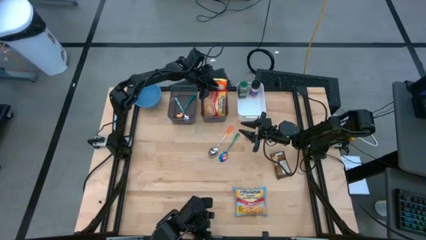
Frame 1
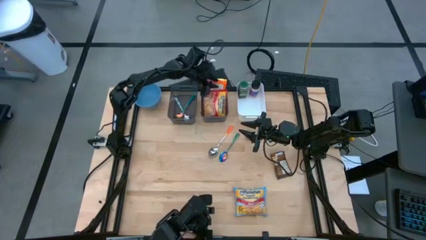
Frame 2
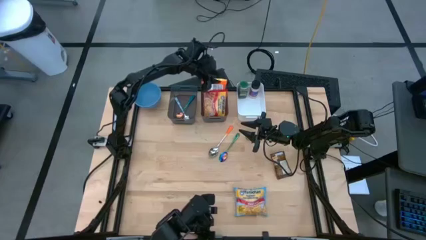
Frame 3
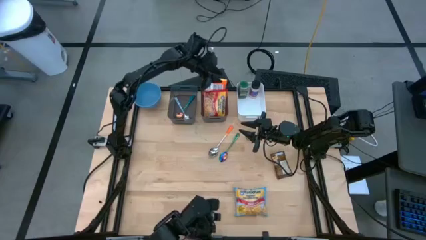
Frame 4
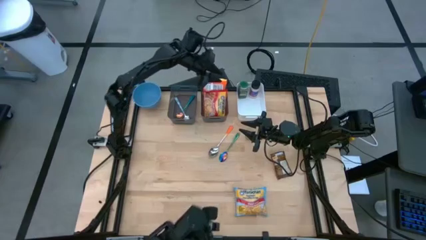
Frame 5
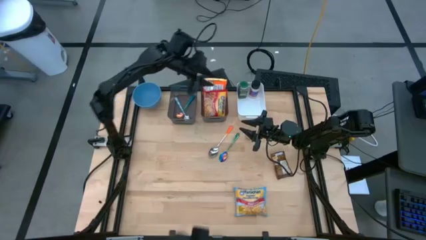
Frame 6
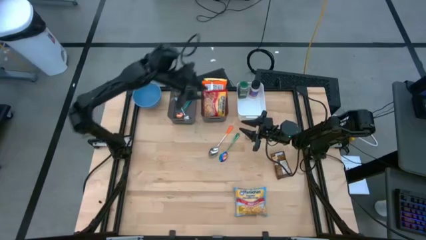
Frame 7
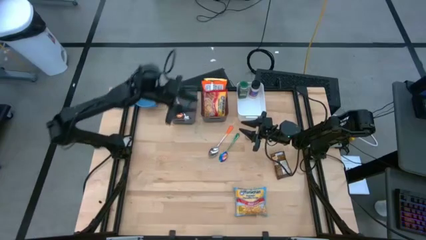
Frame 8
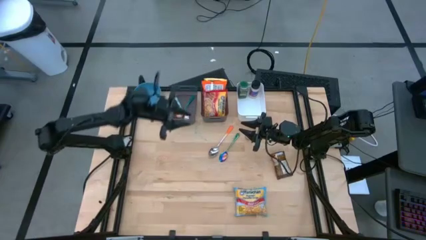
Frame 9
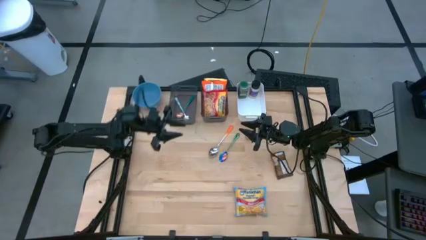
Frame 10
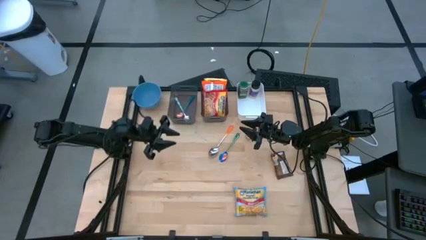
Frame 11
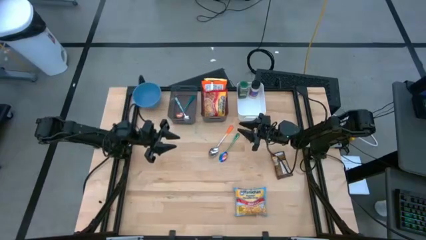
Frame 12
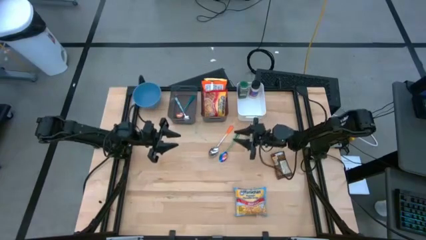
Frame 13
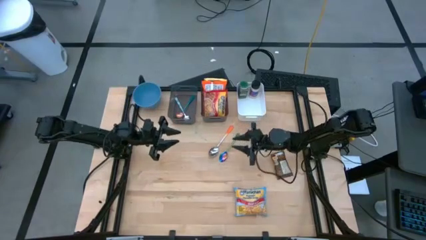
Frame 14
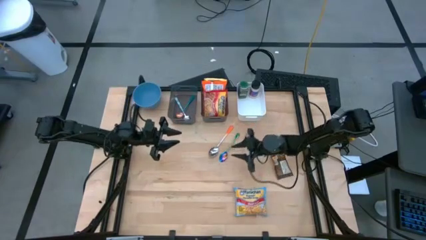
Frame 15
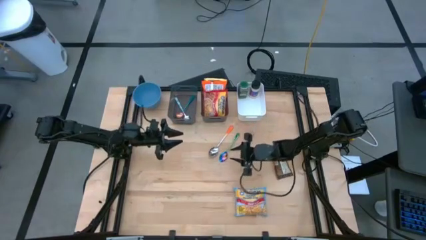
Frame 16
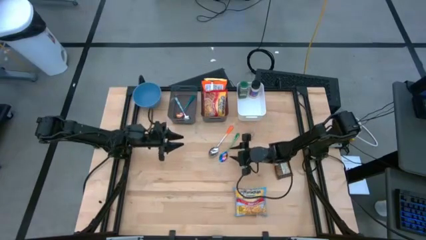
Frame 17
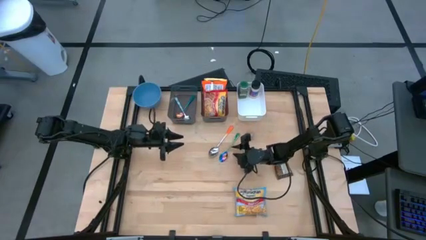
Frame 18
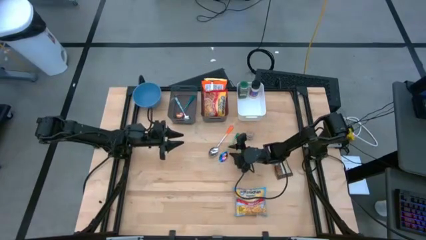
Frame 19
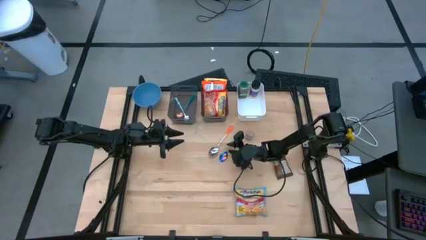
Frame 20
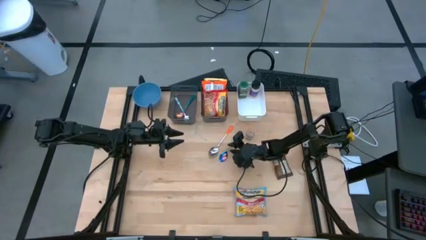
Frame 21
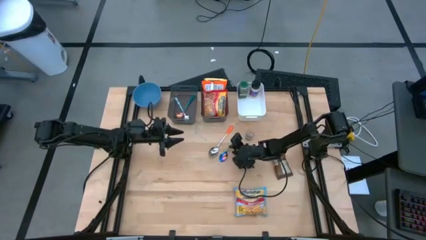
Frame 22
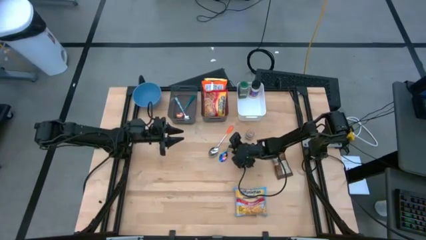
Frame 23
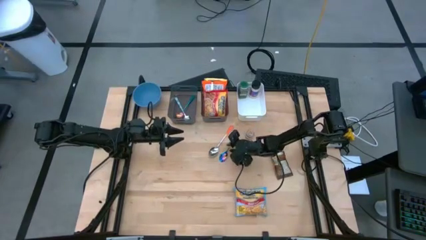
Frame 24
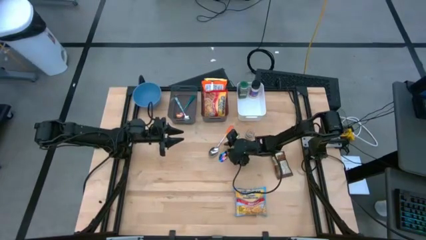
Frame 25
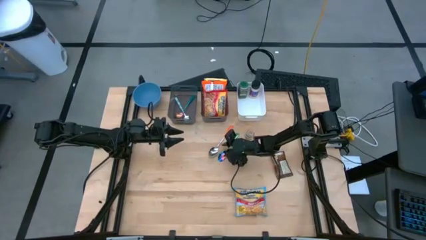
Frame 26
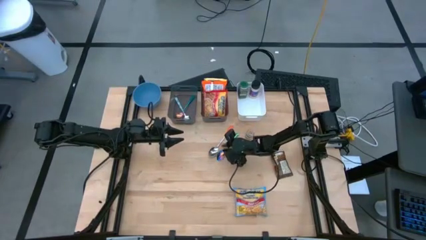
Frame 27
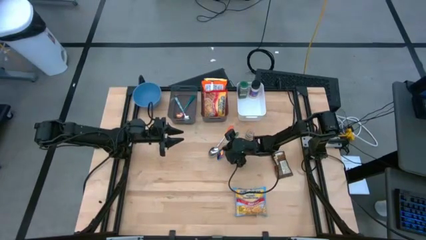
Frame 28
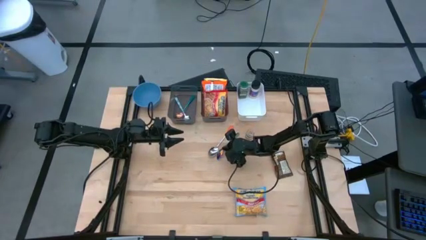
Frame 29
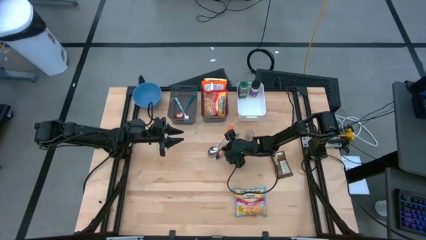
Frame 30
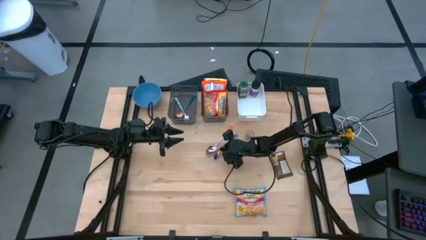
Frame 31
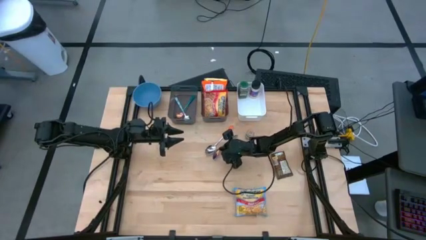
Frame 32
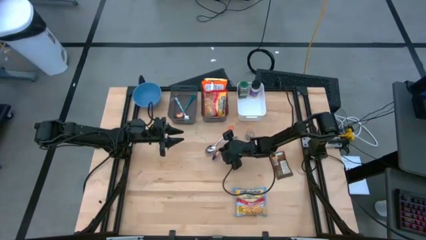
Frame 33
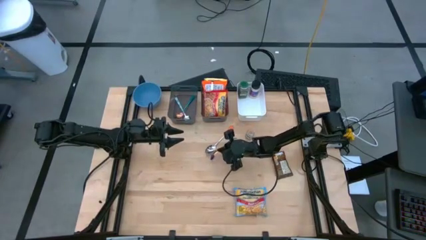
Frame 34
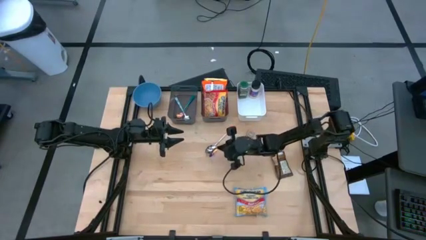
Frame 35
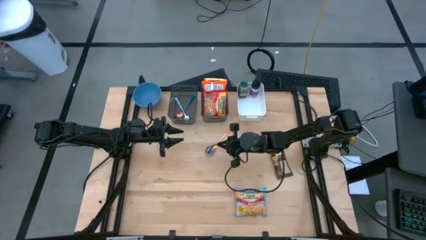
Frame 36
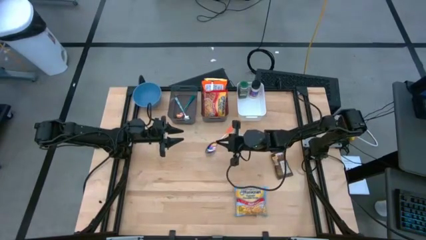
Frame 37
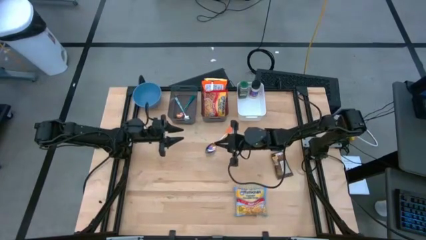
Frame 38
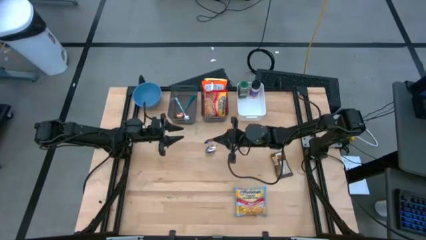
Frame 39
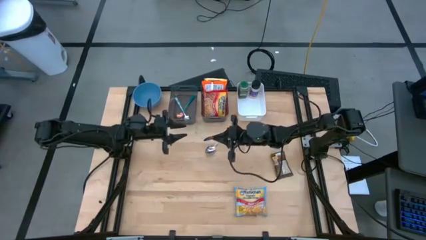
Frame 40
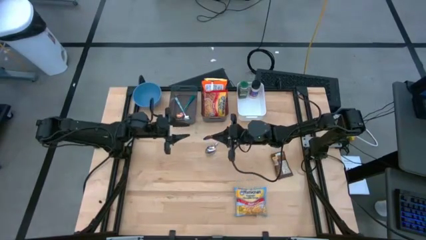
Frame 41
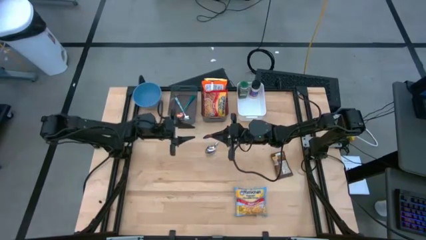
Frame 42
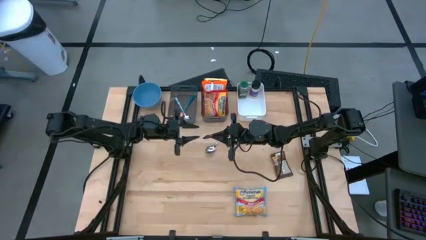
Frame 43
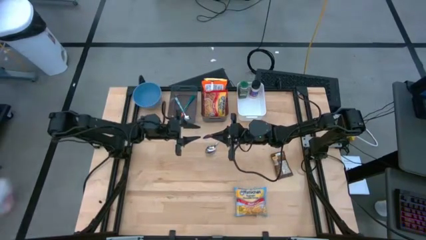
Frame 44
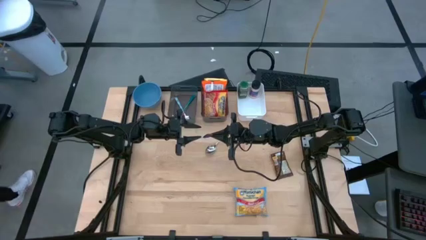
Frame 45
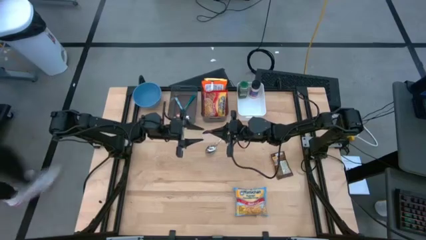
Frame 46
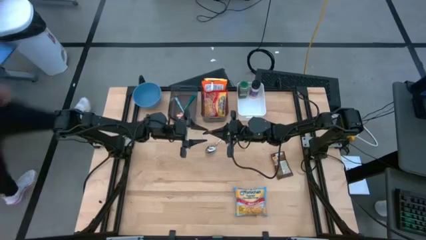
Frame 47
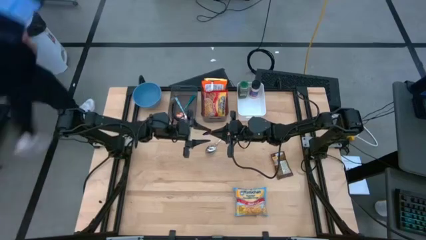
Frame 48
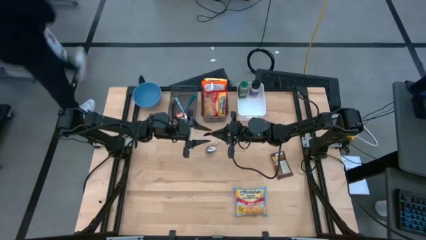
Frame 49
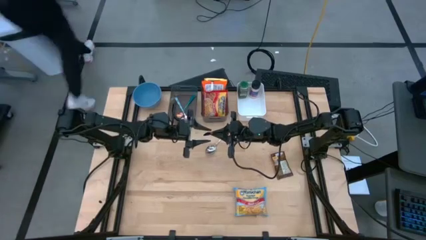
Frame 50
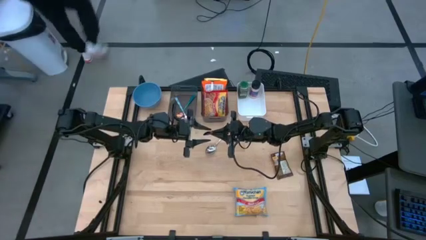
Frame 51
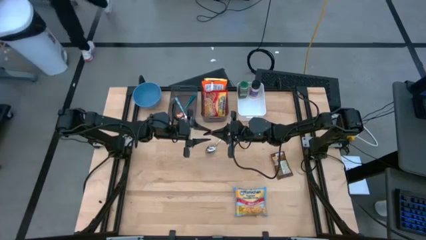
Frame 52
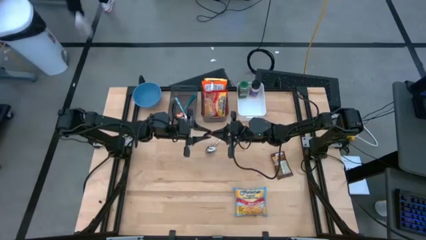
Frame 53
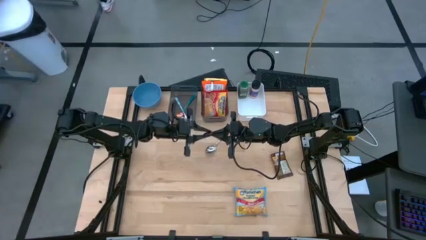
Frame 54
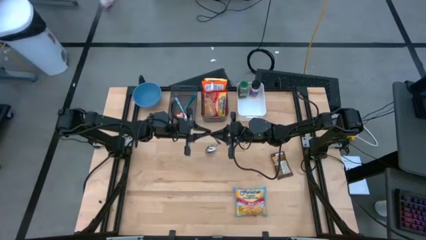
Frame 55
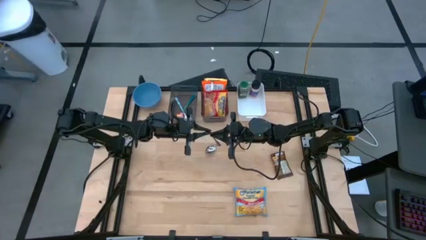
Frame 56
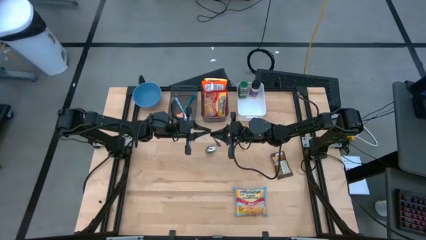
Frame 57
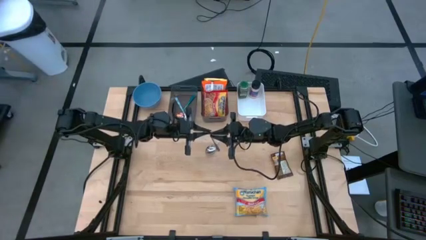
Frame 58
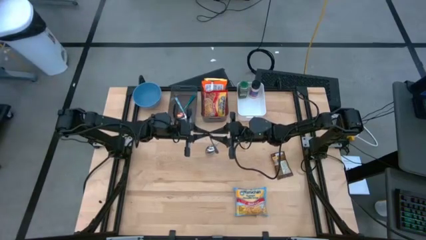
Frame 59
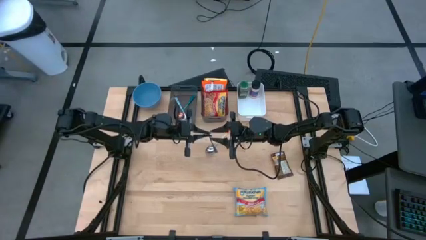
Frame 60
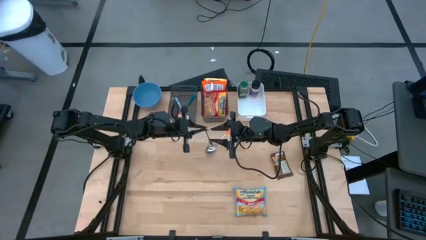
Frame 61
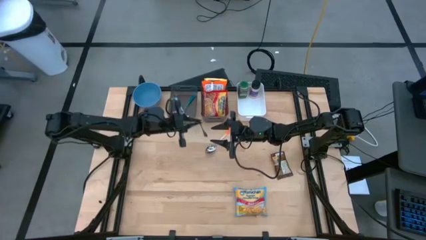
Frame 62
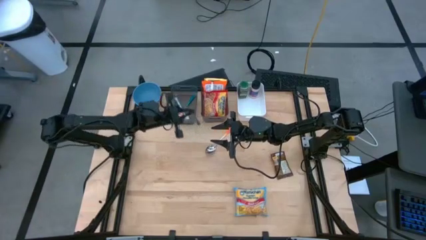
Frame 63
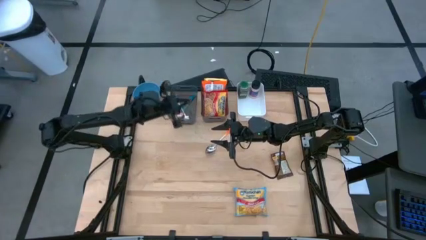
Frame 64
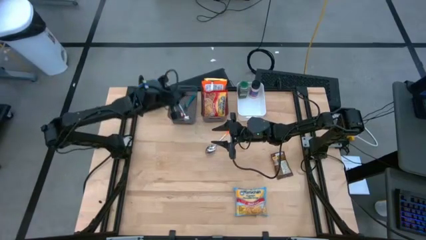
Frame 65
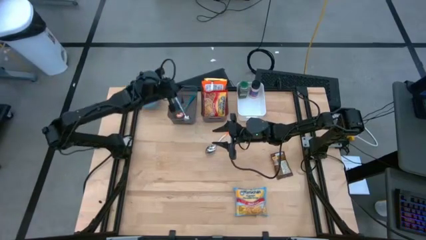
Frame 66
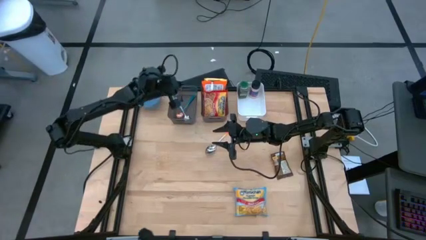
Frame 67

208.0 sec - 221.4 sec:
Task: Pick & Place Food Item
Put the blue spoon into the left black bin

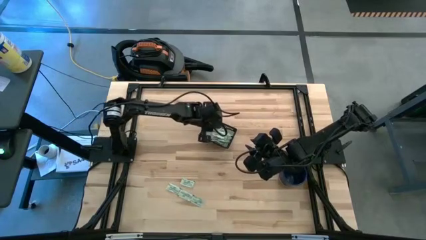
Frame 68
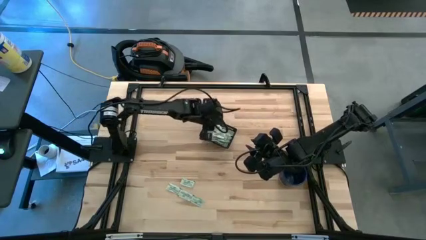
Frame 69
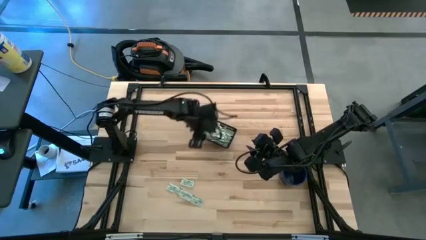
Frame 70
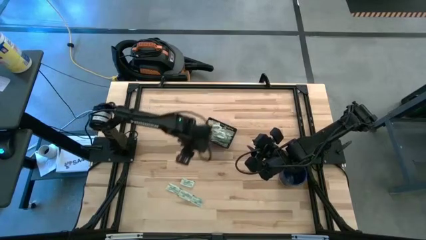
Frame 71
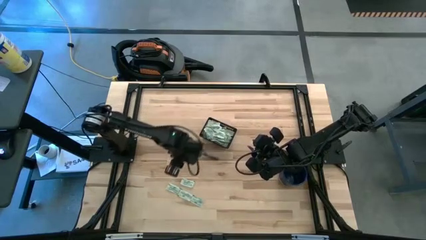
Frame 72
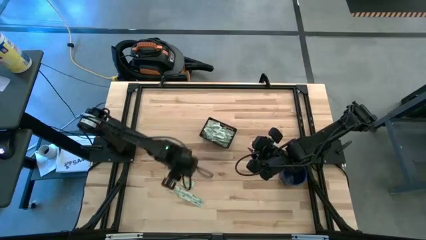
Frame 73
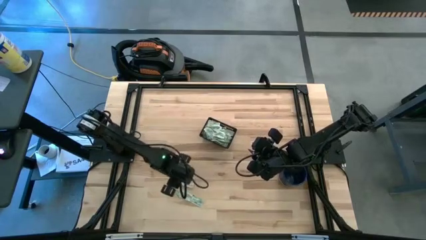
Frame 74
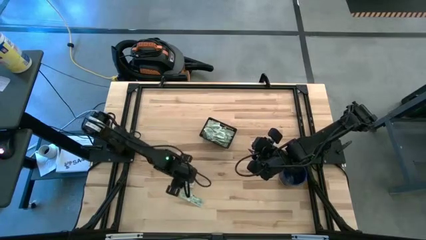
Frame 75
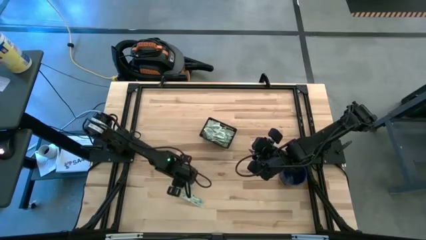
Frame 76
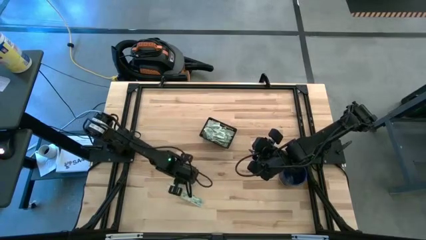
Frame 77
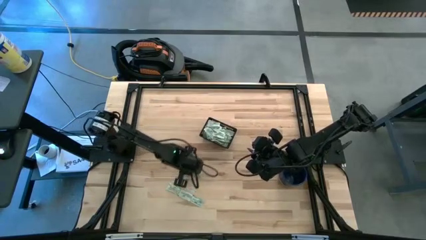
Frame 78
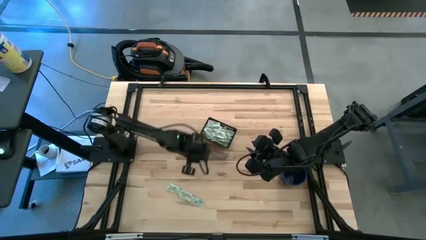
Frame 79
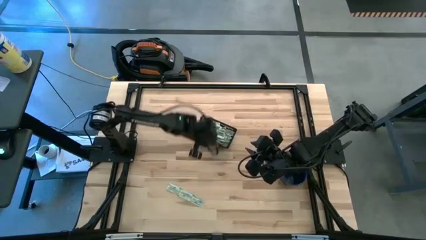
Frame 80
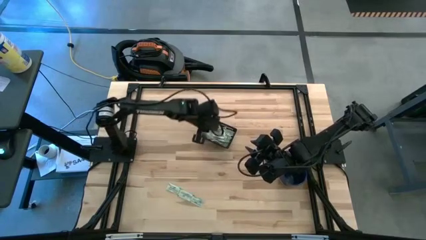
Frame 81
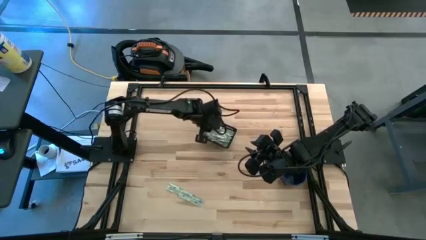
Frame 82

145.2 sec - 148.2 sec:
Task: Pick and place Stevia / Truvia into bins
Put the stevia packet into the black bin
